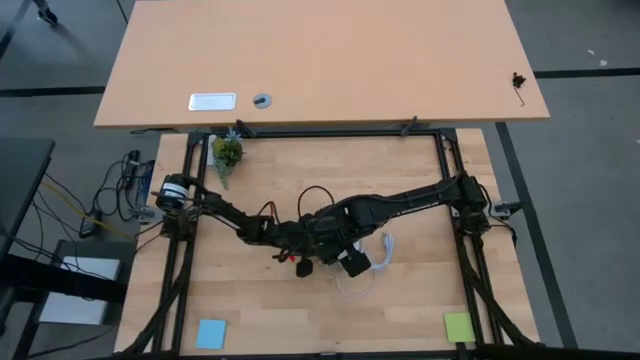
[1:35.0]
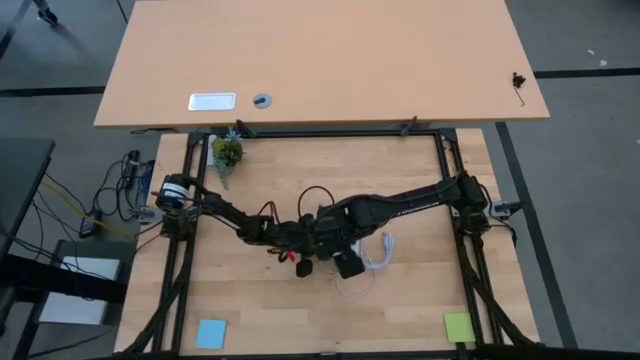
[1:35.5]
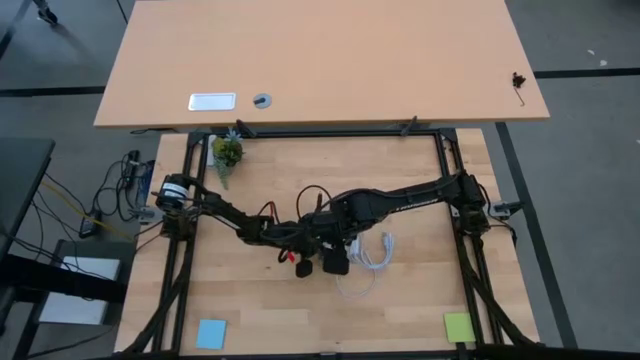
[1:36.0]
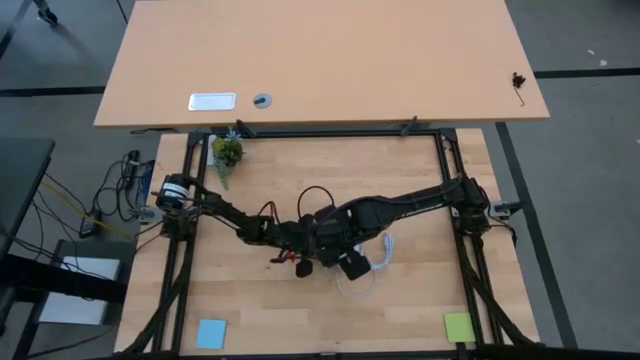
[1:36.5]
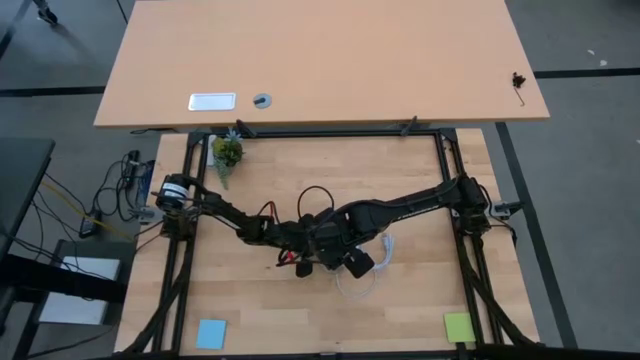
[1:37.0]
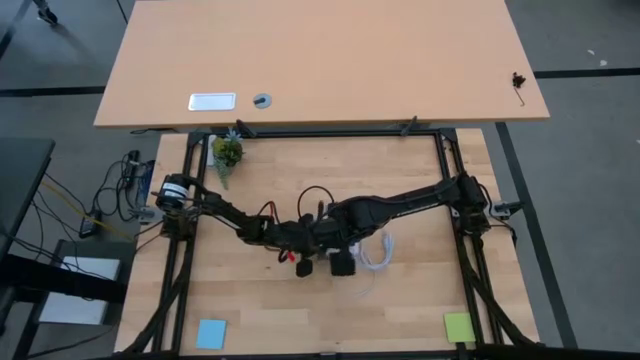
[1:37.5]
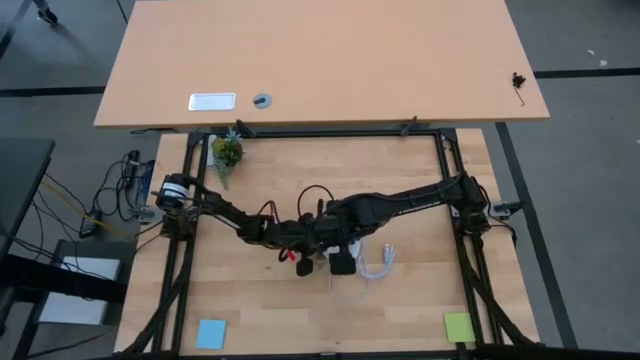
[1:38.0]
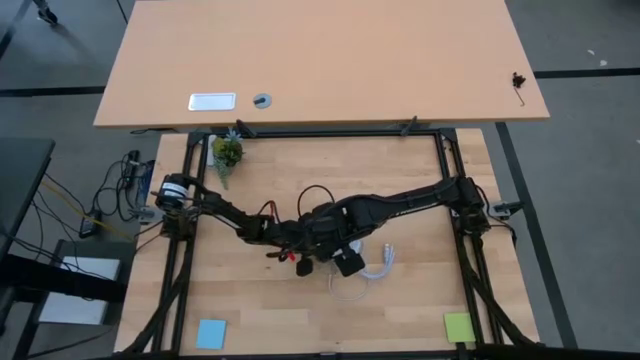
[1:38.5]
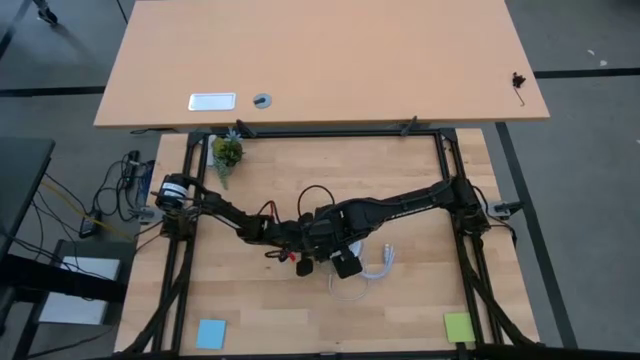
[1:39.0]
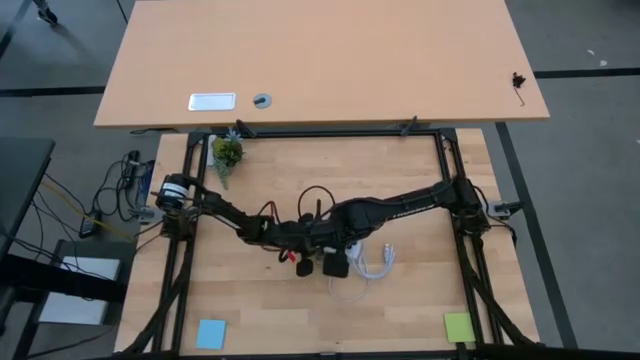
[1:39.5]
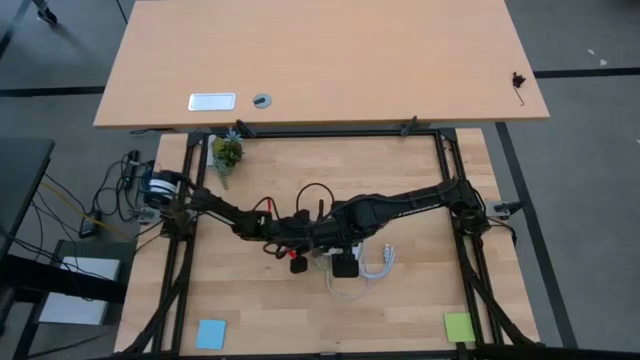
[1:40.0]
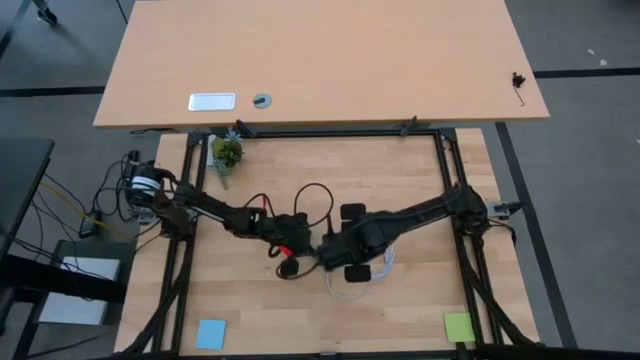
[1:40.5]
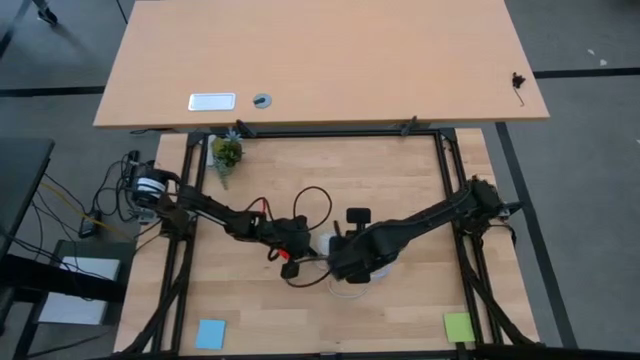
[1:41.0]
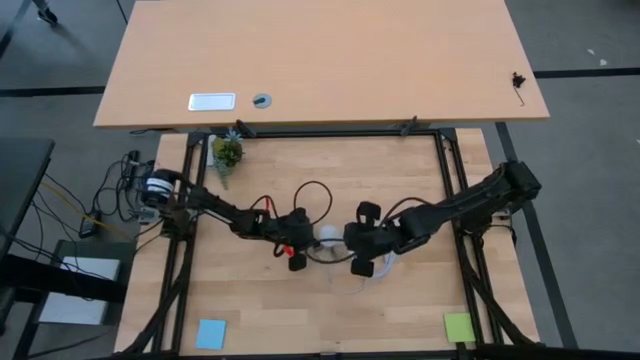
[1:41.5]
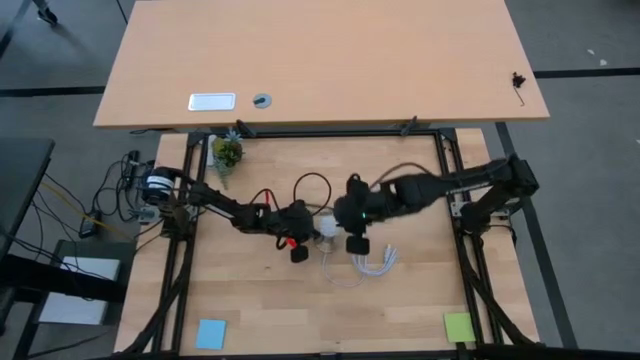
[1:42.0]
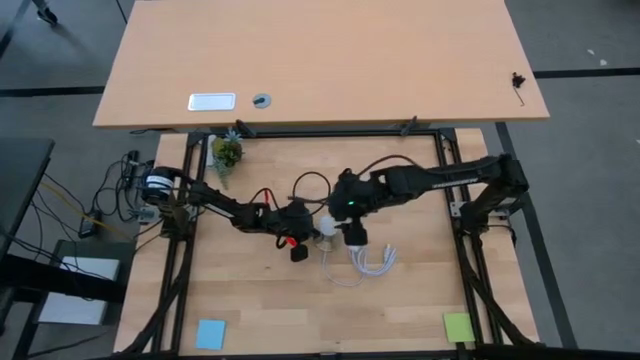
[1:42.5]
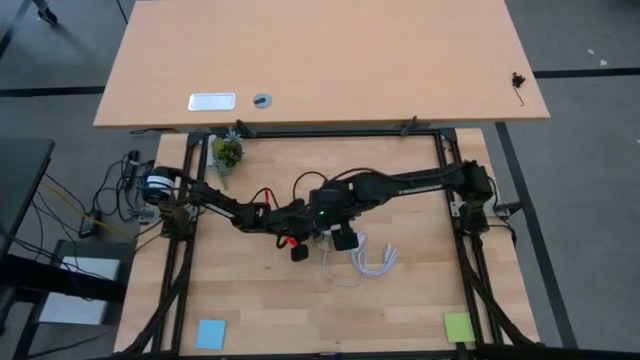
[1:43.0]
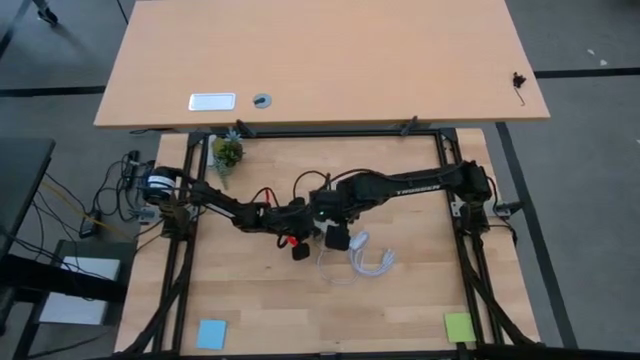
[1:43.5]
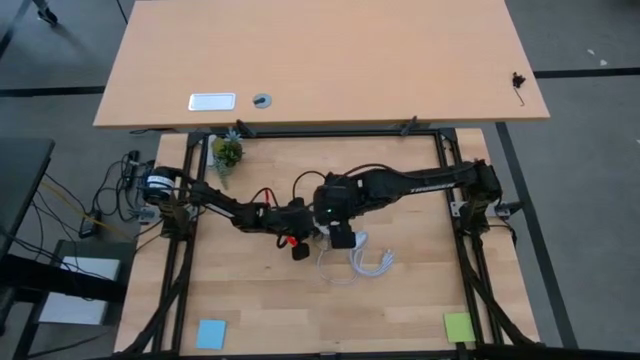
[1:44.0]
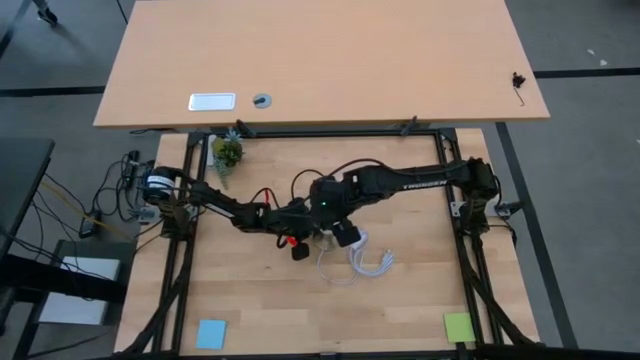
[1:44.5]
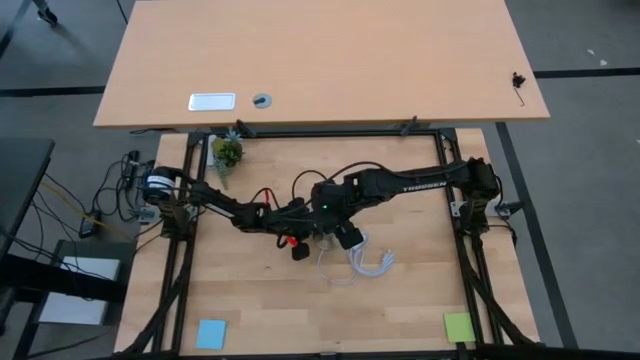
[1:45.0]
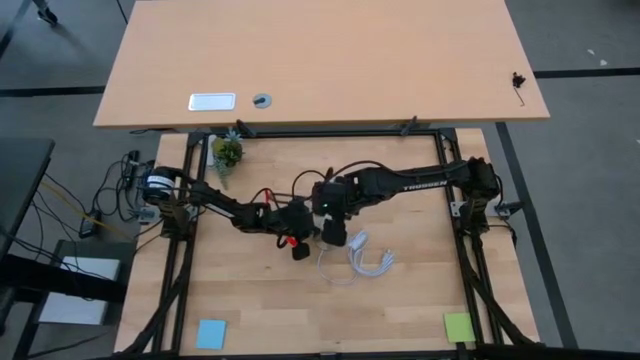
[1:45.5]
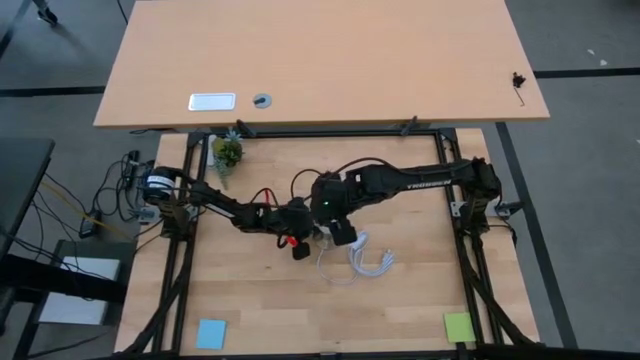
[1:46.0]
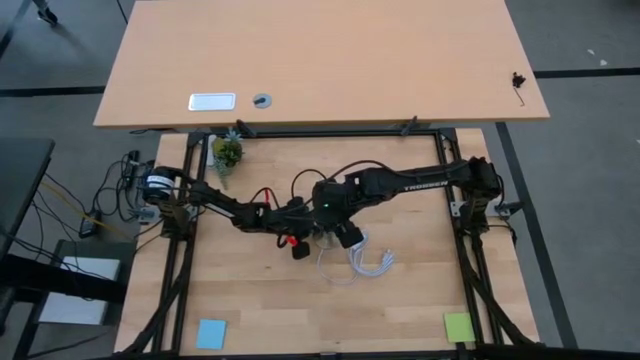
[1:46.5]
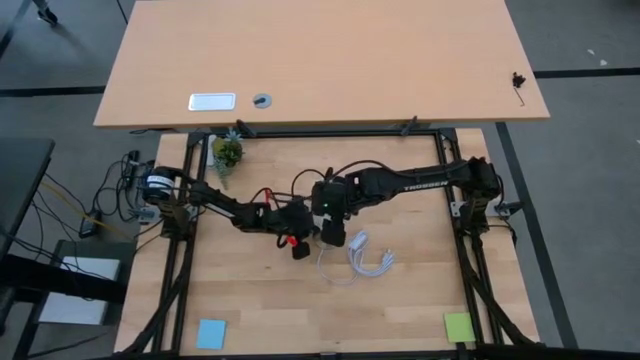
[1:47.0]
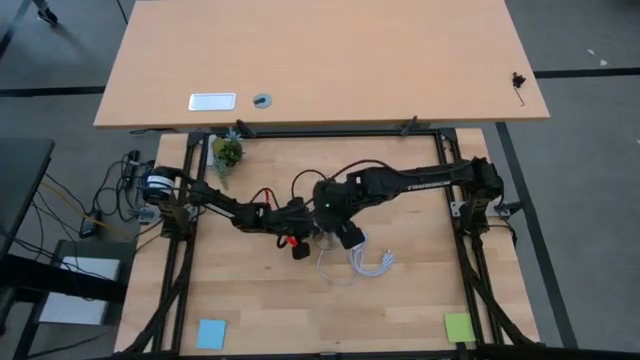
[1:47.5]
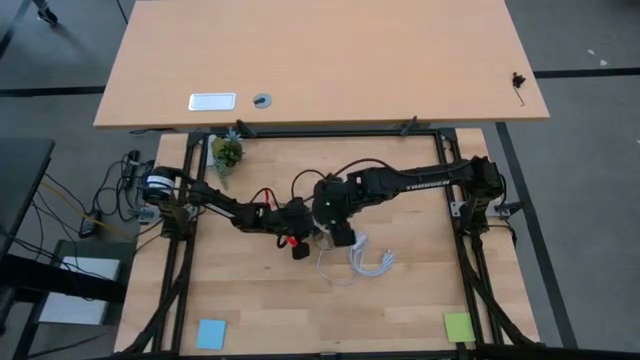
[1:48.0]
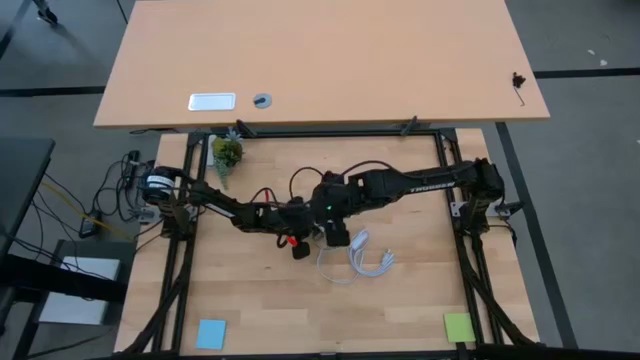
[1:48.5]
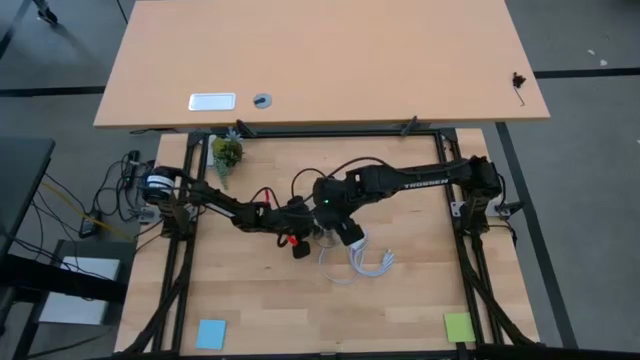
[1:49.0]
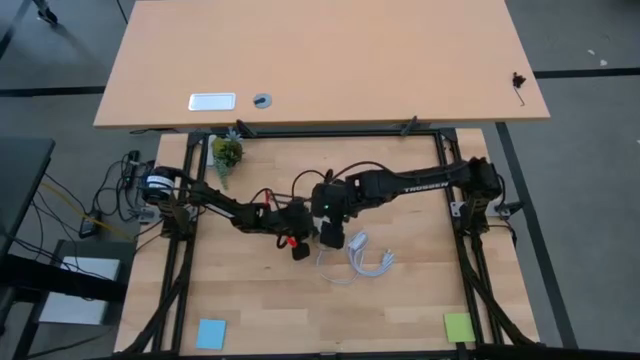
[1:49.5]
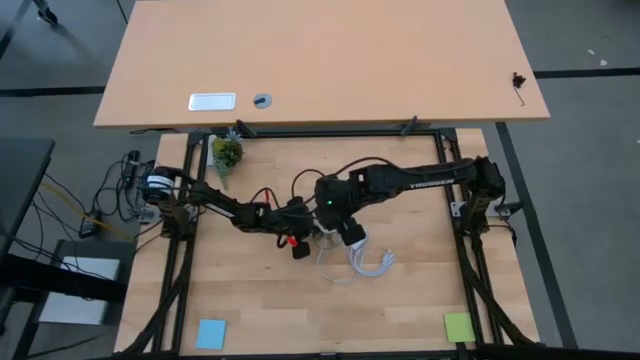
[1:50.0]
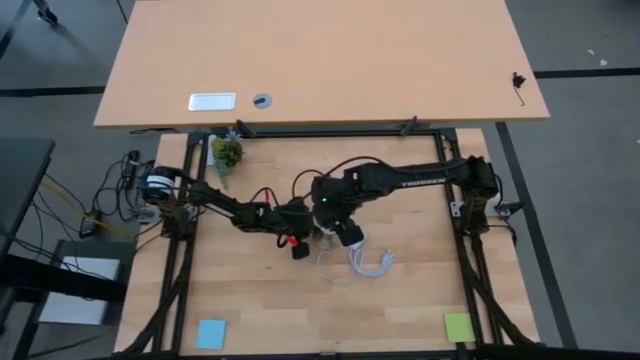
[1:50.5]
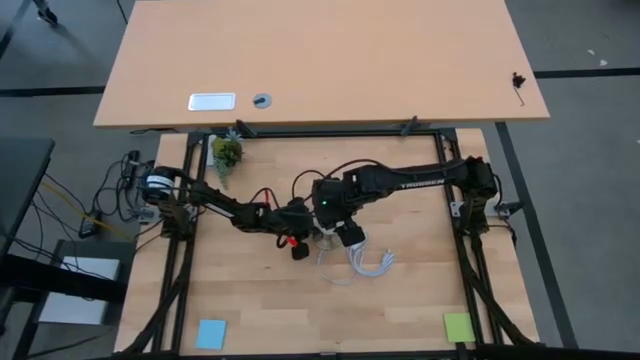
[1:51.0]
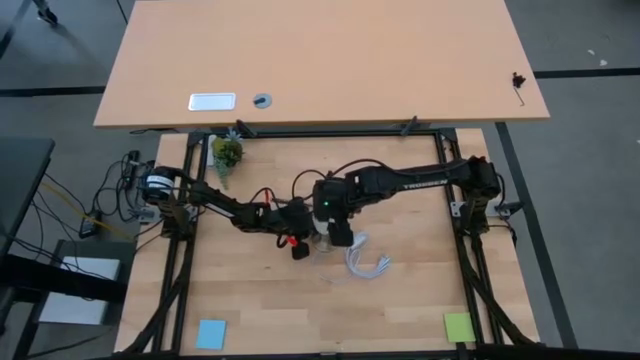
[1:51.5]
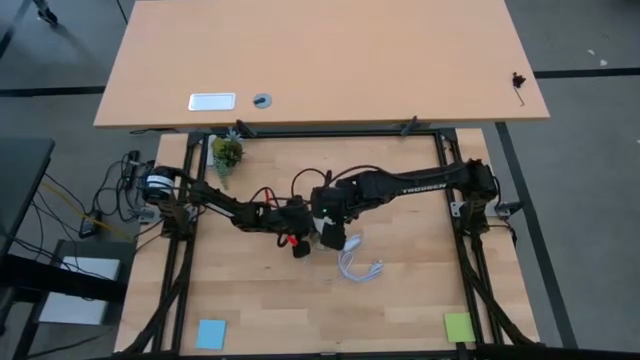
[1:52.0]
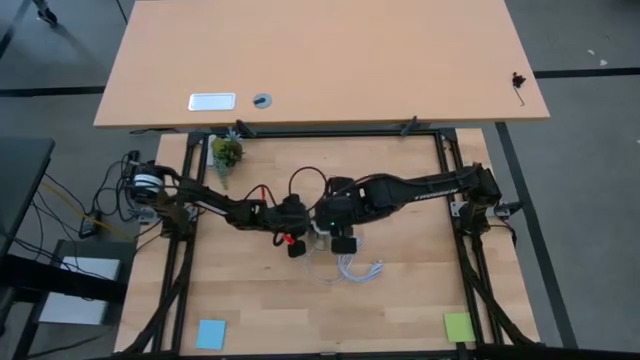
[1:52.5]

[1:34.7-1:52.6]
Task: Screw lightbulb
Insert the lightbulb into the lamp socket

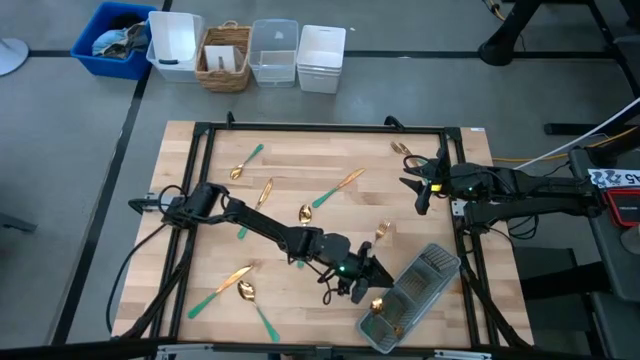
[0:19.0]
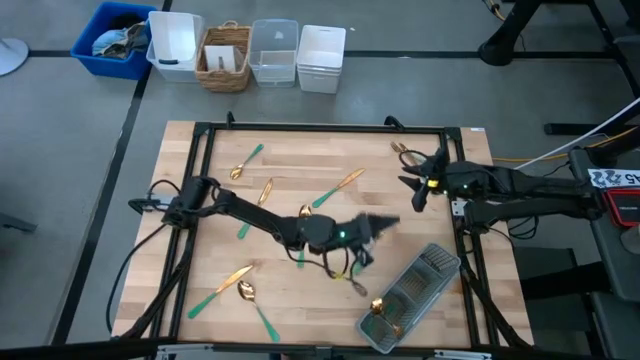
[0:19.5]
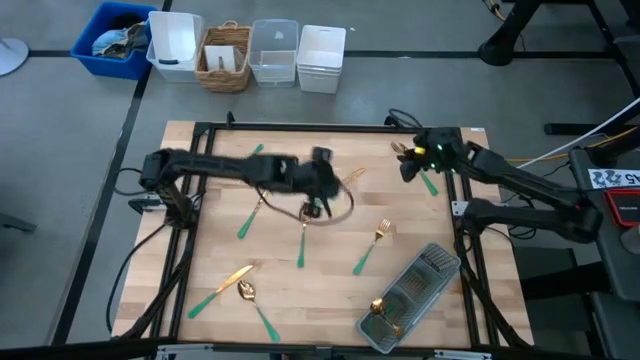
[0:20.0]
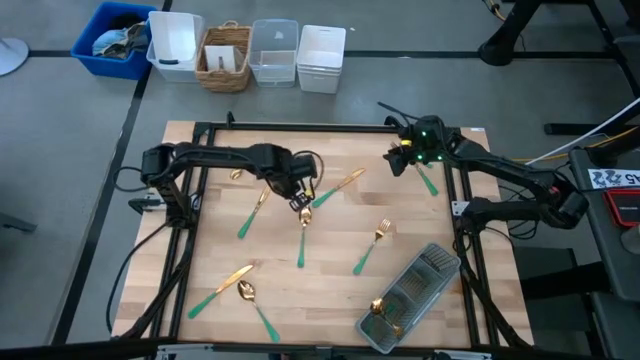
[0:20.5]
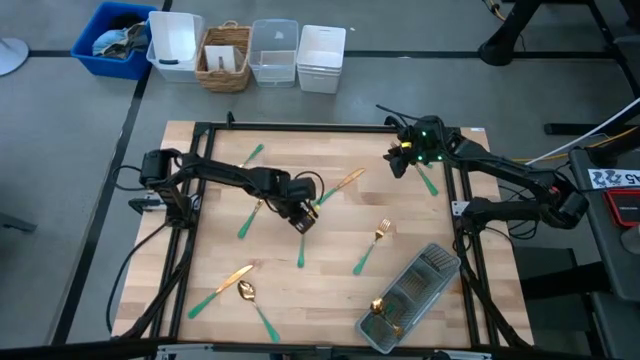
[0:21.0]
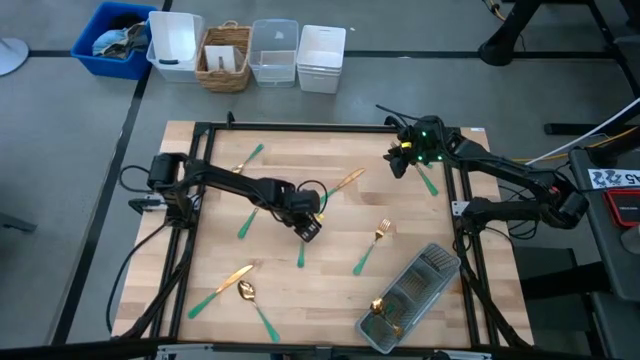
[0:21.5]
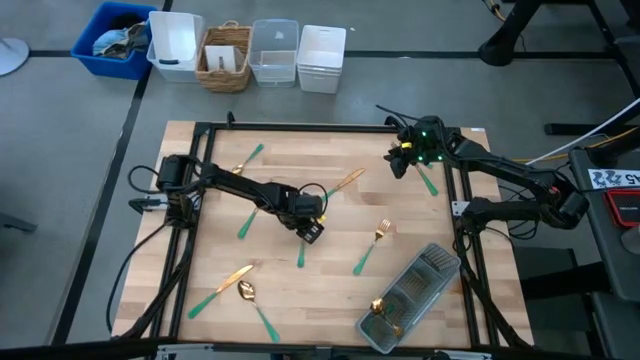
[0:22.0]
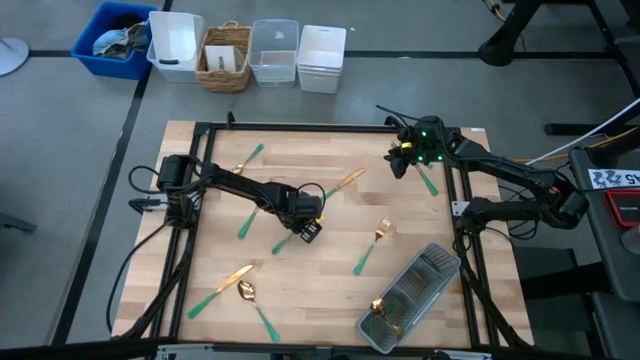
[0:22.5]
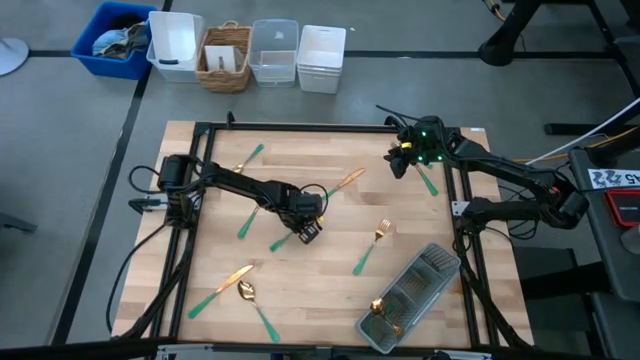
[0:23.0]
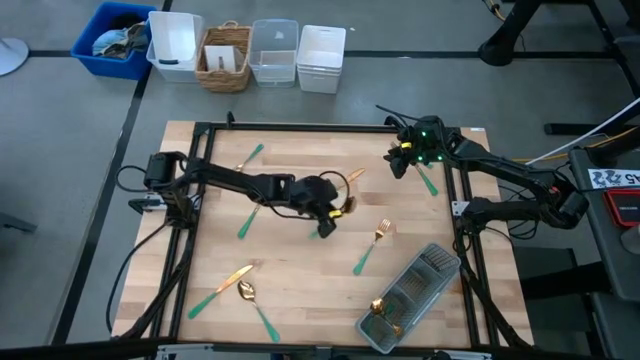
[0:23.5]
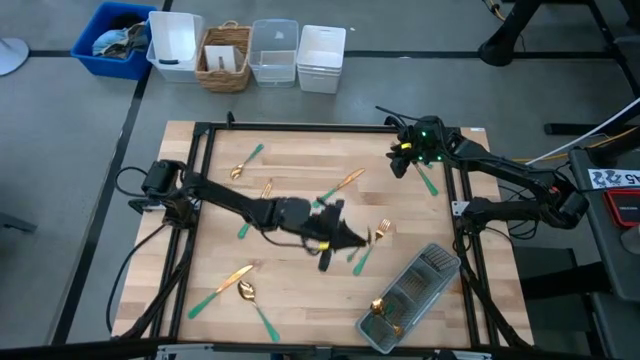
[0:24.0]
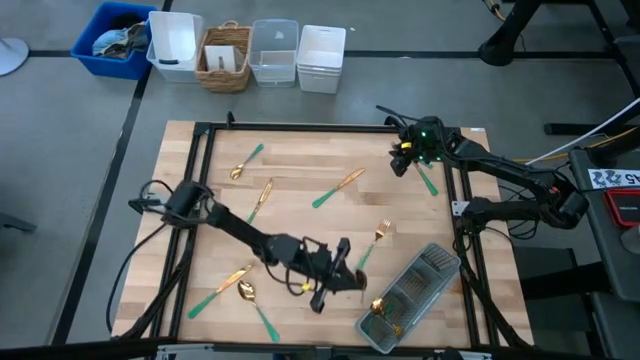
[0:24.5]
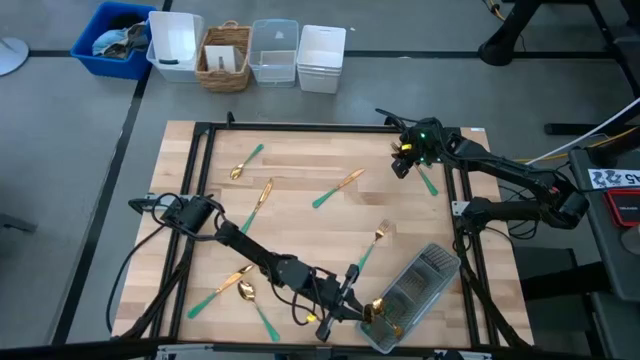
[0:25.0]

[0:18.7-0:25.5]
Task: Sort silverware
Put the center spoon into the utensil organizer
